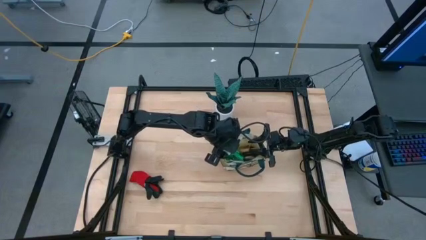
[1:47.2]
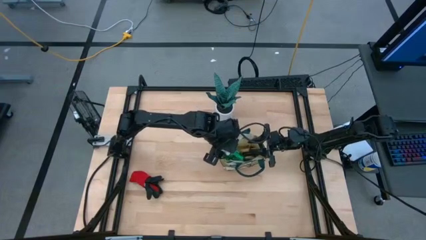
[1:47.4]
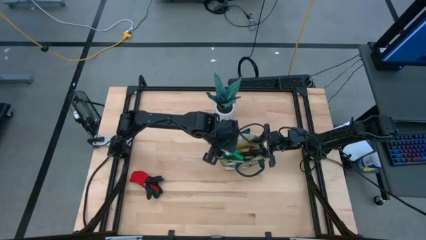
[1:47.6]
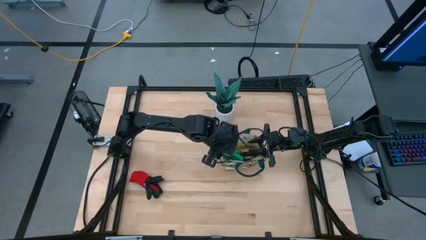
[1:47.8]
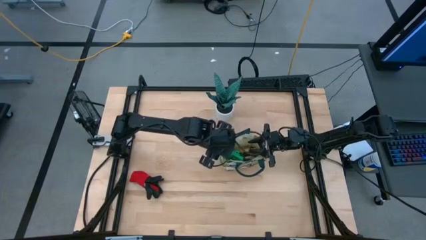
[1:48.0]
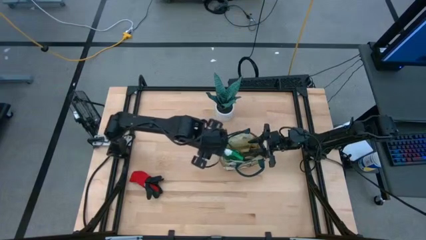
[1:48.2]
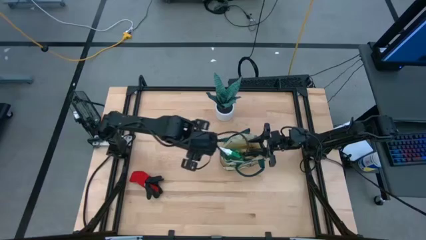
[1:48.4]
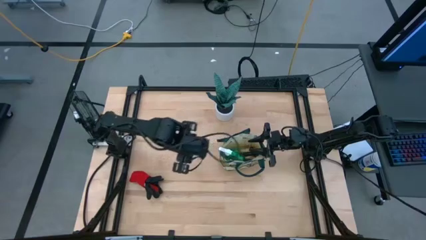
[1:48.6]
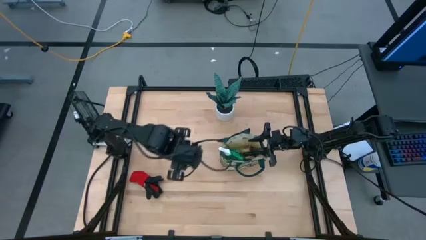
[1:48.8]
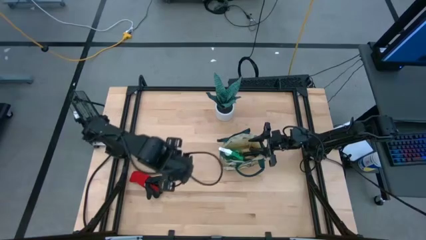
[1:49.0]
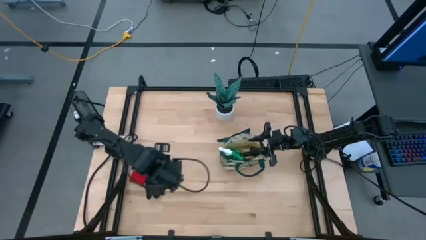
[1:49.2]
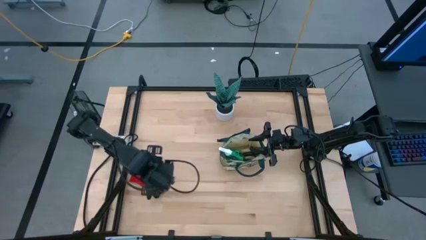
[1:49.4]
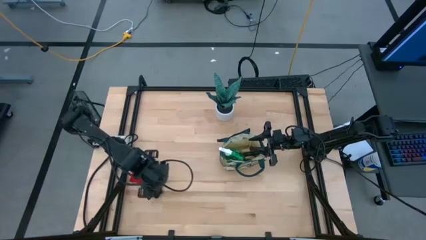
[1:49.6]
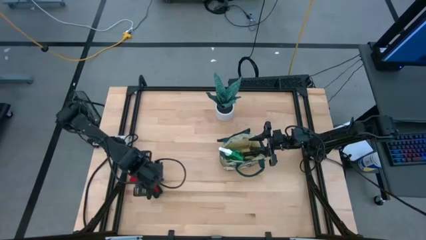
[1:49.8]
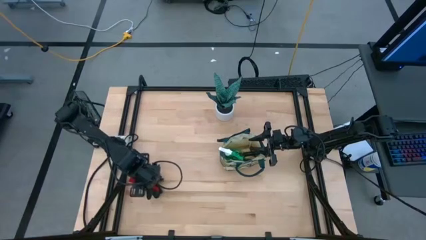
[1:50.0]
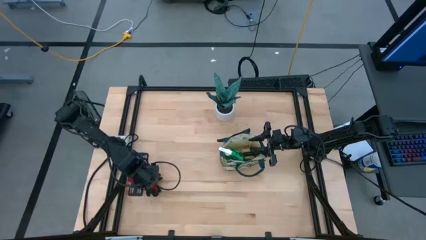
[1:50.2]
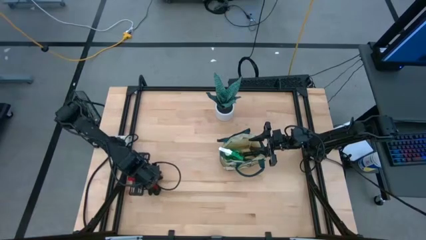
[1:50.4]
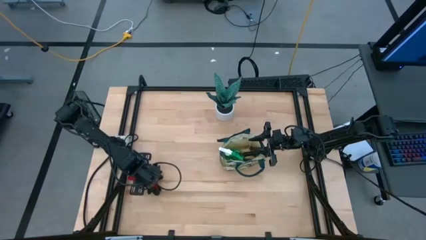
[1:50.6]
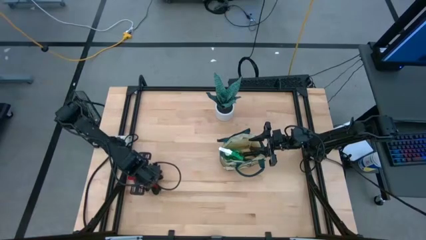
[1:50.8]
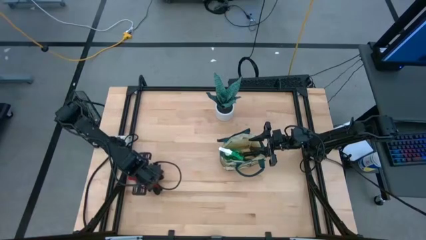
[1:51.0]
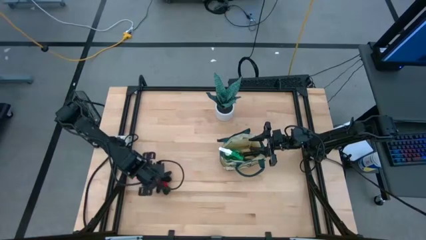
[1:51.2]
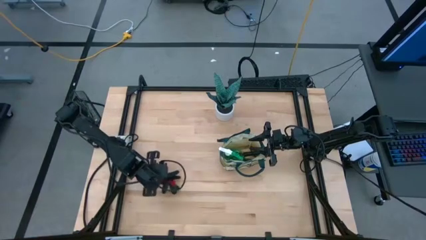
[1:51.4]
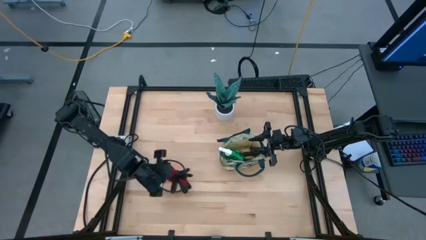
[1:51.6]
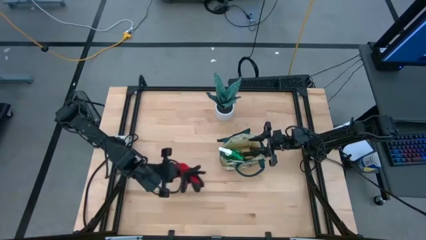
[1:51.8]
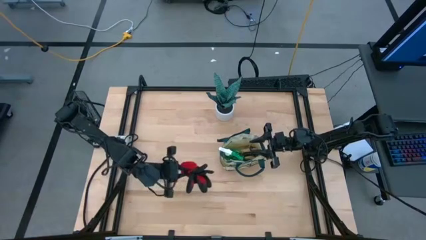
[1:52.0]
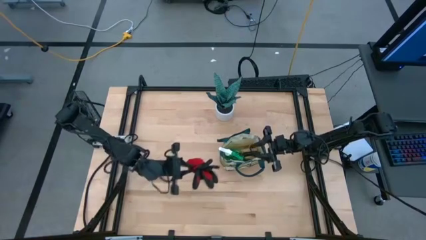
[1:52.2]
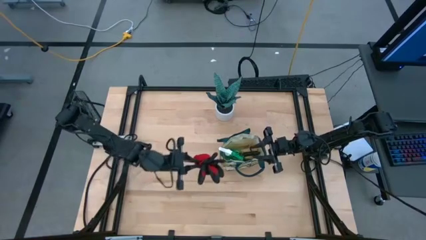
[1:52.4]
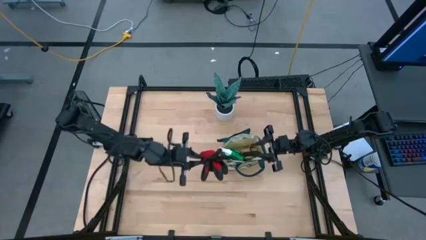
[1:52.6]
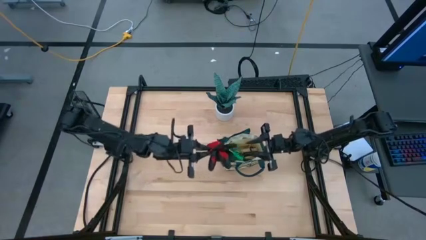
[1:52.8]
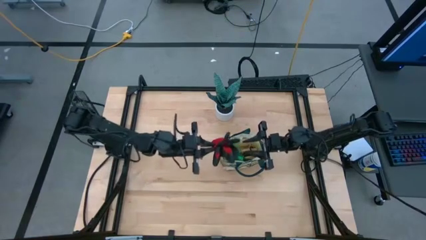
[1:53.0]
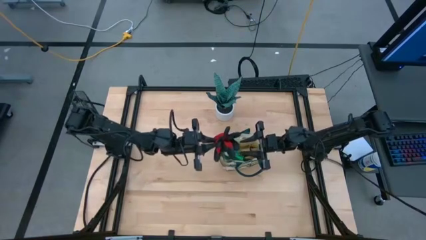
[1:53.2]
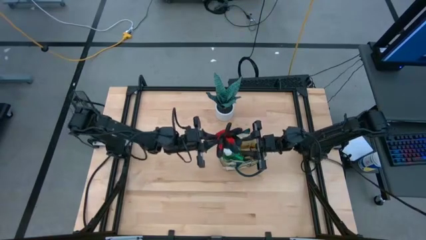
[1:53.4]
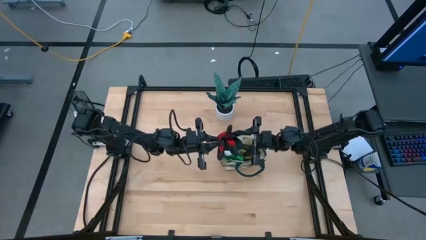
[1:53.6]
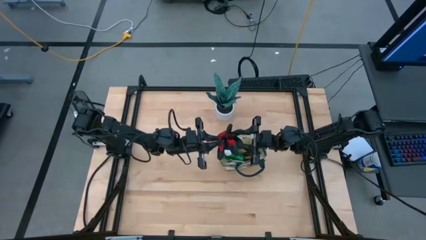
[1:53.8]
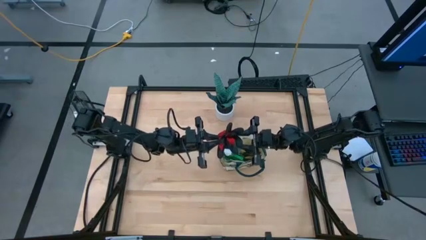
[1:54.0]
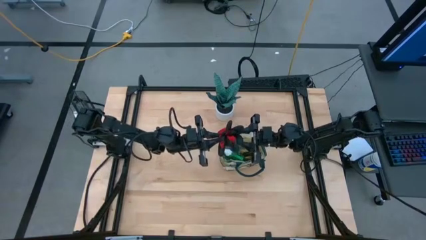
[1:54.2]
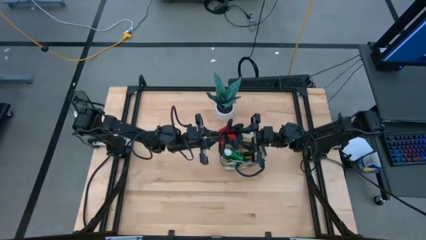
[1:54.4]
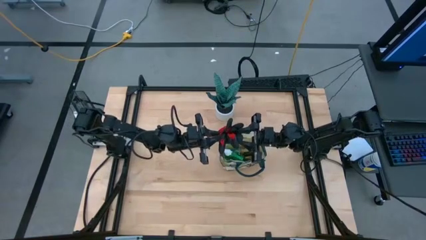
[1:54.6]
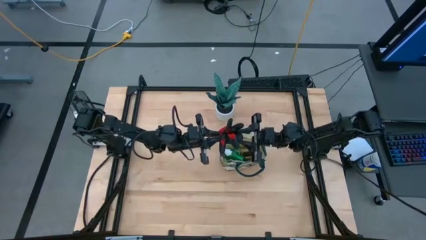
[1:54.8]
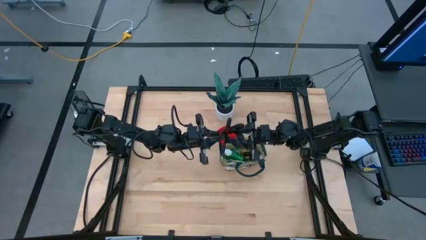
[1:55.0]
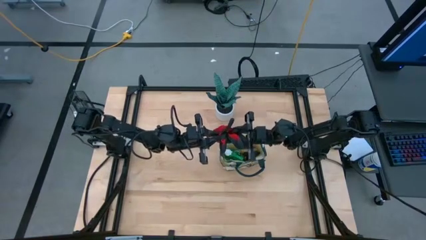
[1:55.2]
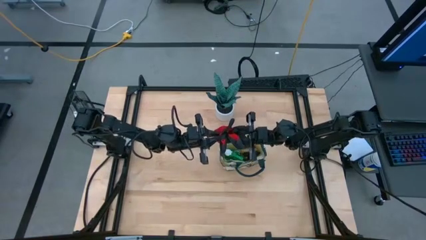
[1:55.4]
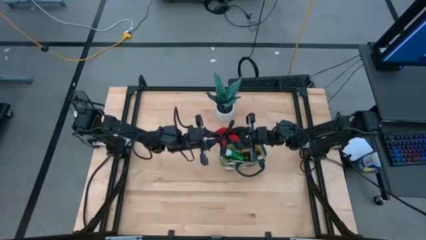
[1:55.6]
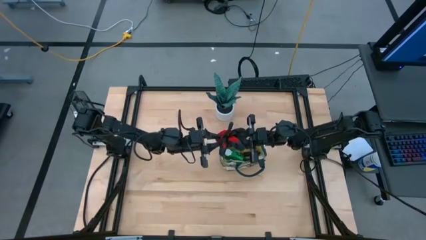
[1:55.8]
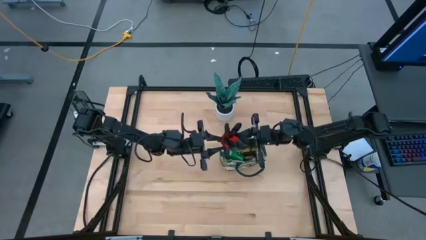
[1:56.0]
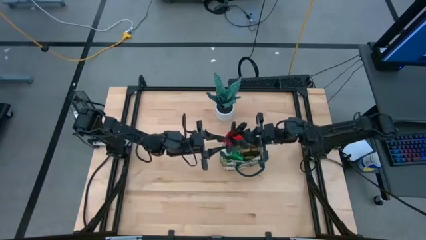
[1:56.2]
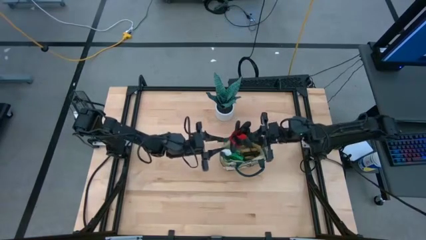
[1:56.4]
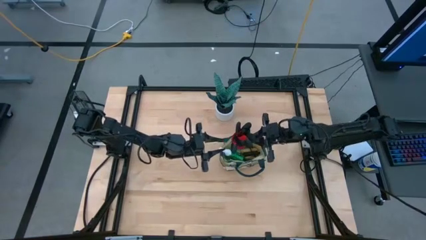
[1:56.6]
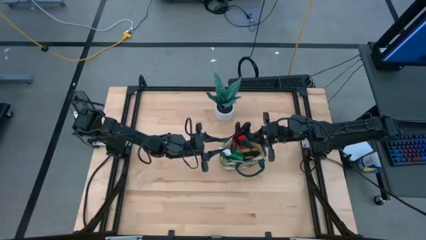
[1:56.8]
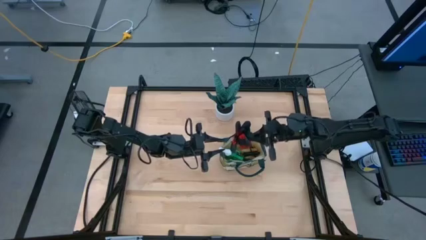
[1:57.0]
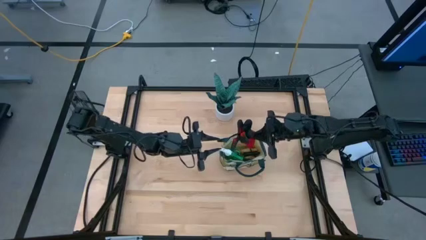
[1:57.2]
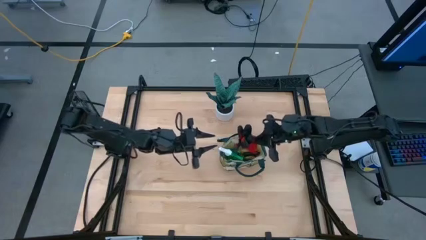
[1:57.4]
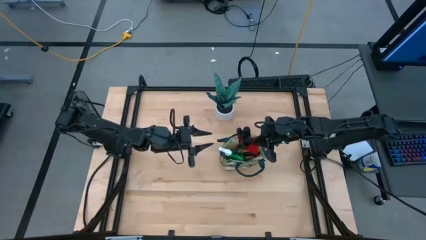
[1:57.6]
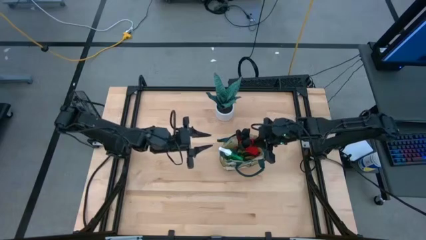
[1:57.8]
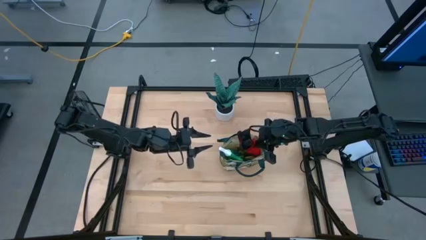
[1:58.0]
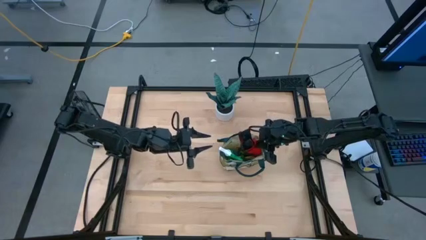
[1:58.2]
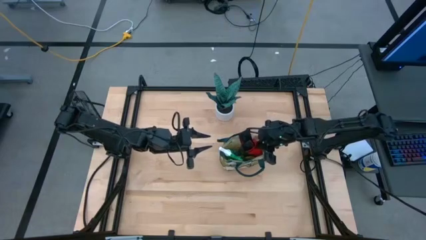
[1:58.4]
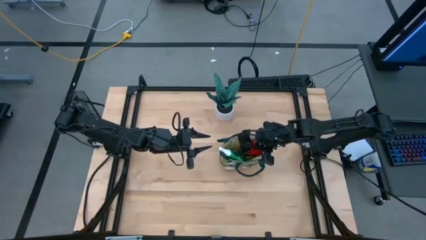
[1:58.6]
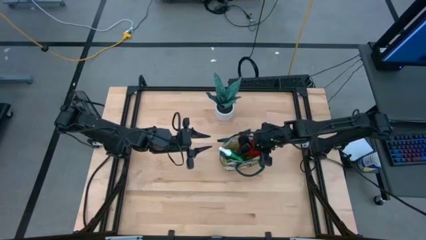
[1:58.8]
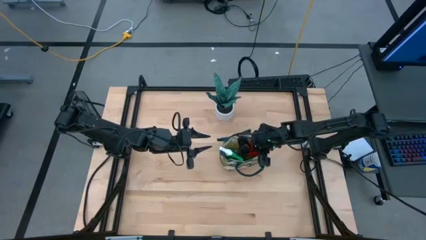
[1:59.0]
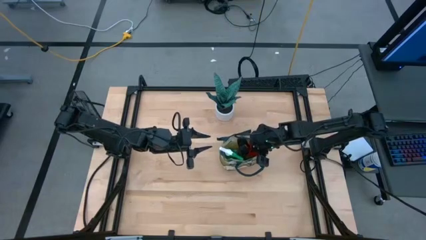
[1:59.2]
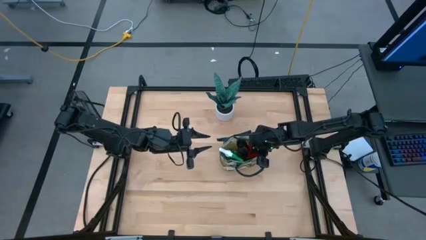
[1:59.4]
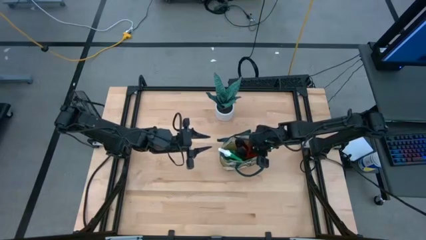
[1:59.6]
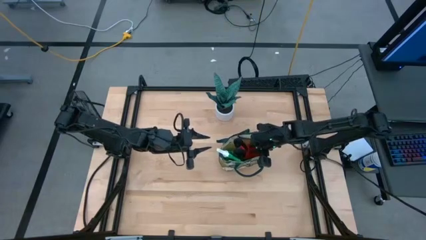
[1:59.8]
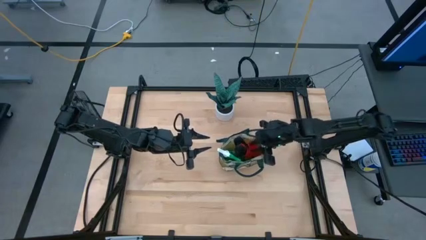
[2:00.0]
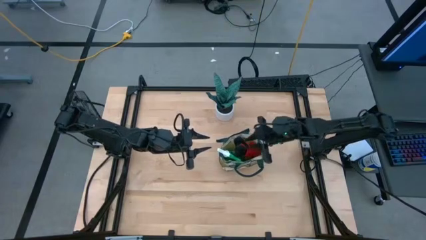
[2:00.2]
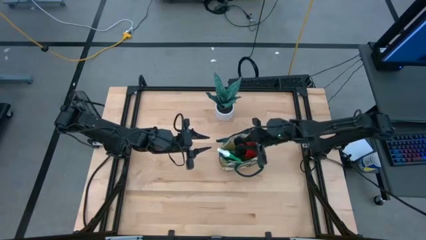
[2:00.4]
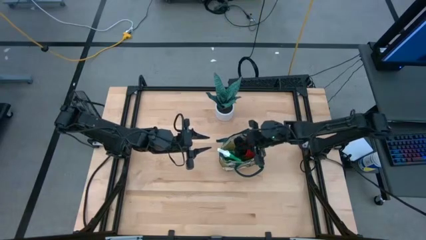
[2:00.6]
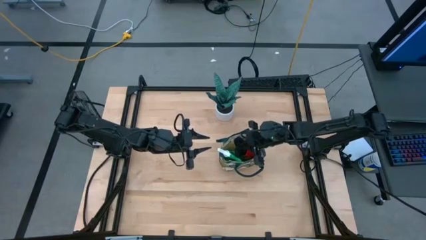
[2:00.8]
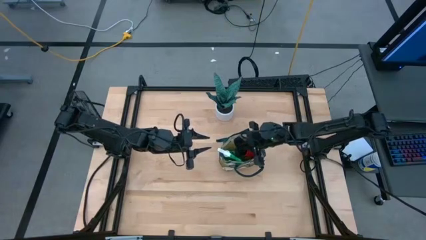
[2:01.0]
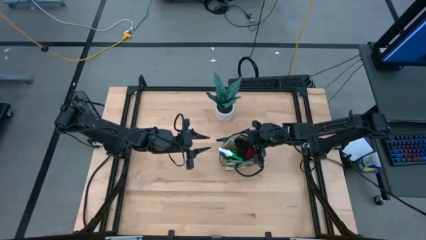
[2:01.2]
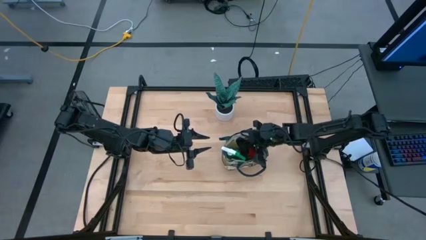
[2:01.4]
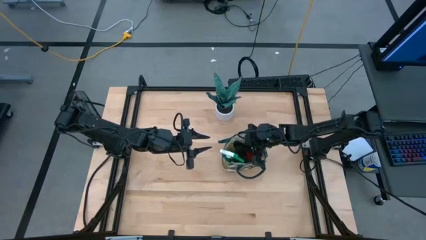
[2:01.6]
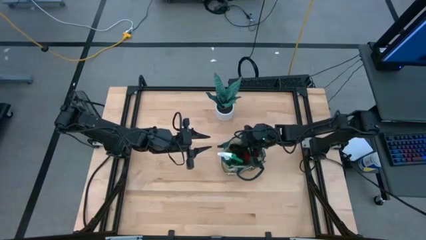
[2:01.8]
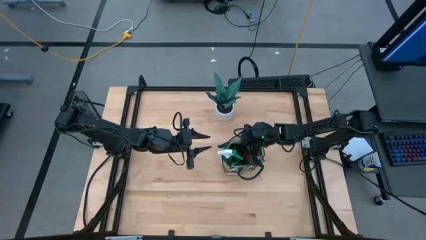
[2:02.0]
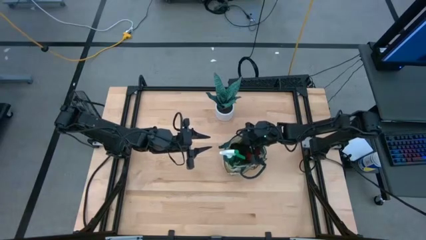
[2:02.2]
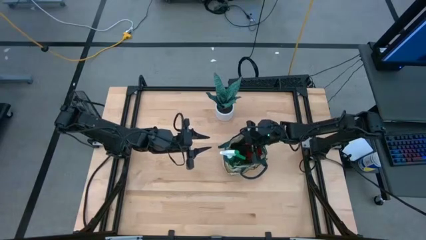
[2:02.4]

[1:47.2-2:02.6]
Task: Pick & Place Garden tools in Gardening bag
Put the red gloves into the gardening bag
